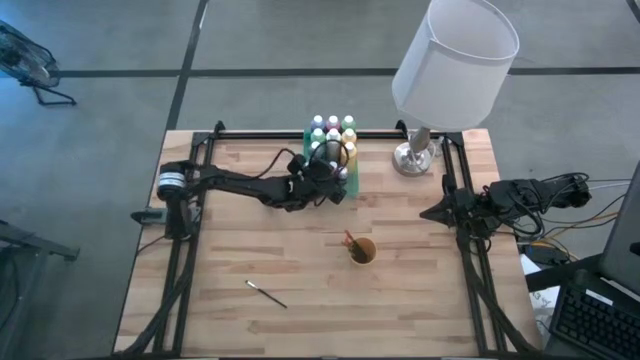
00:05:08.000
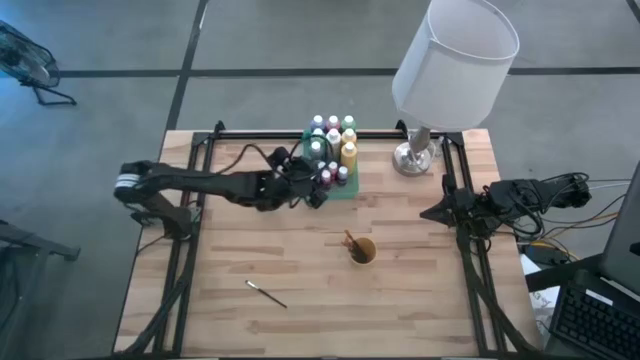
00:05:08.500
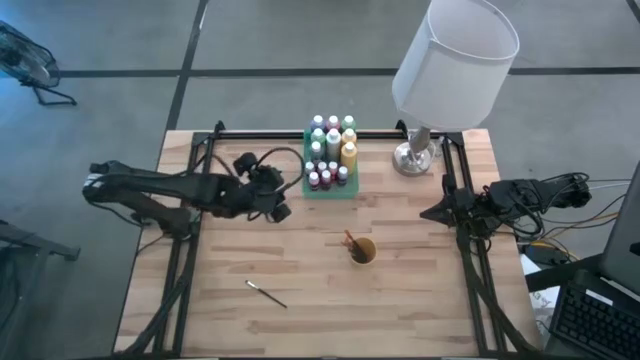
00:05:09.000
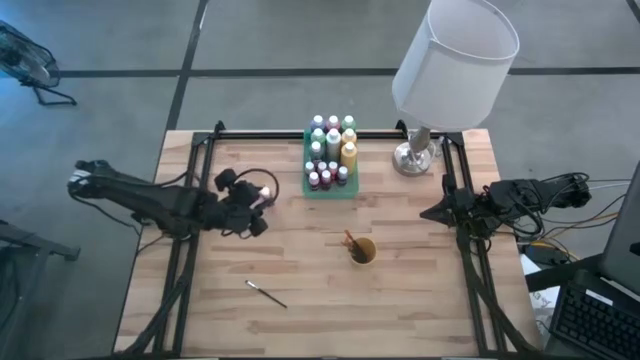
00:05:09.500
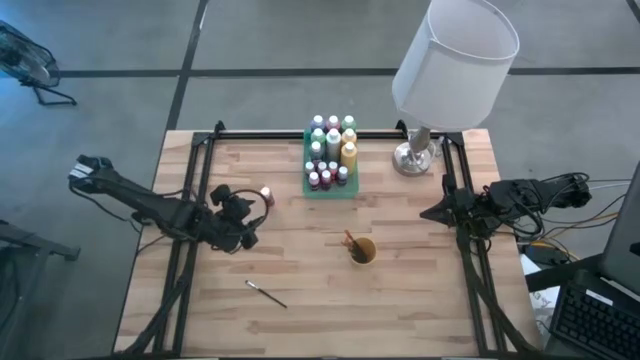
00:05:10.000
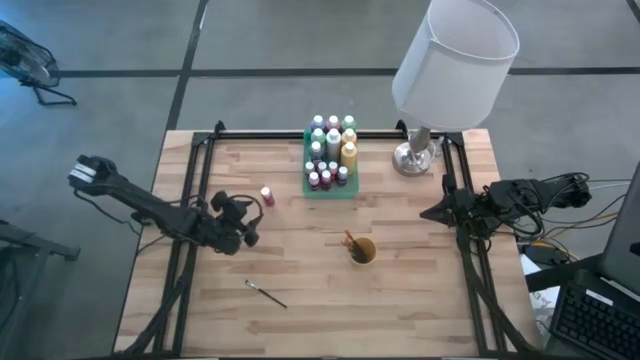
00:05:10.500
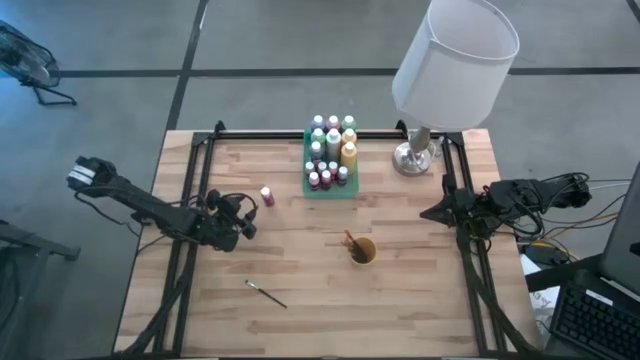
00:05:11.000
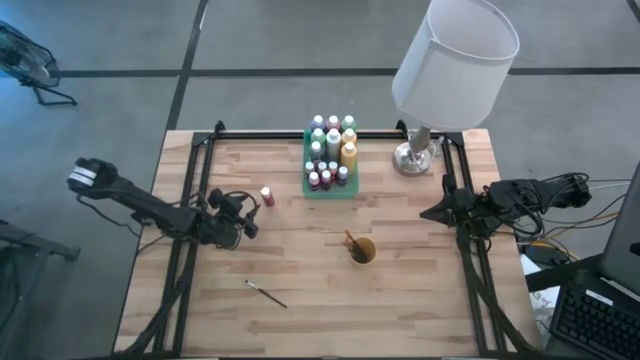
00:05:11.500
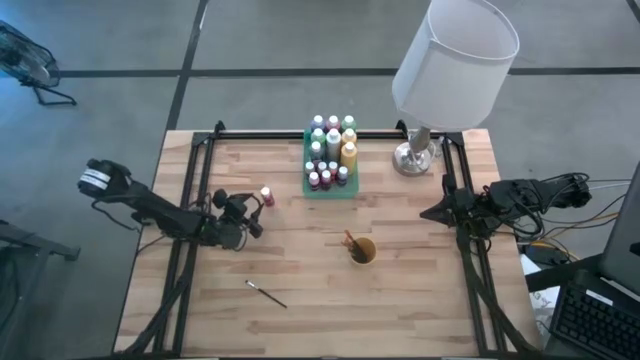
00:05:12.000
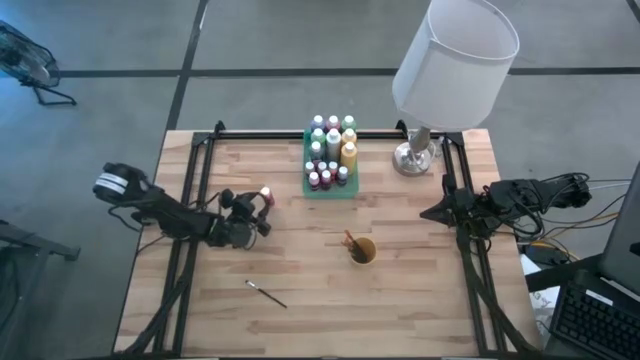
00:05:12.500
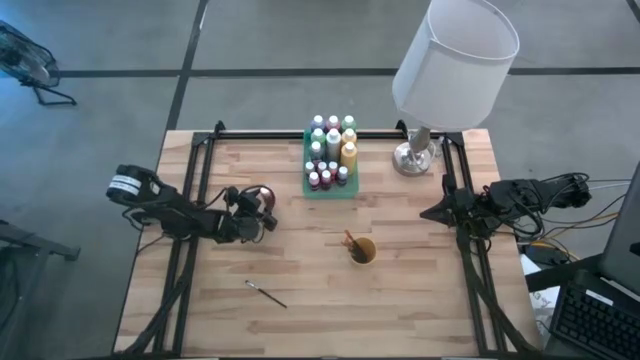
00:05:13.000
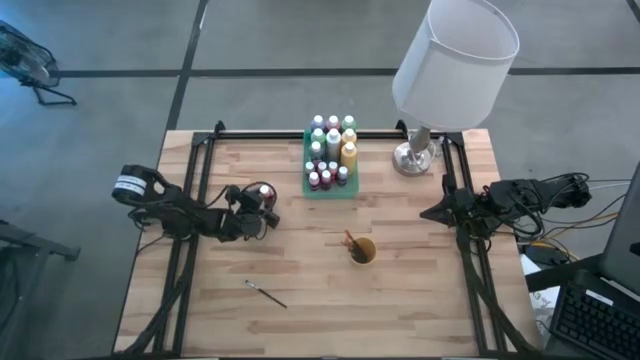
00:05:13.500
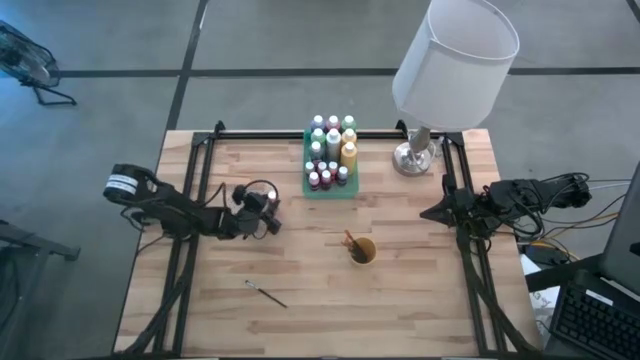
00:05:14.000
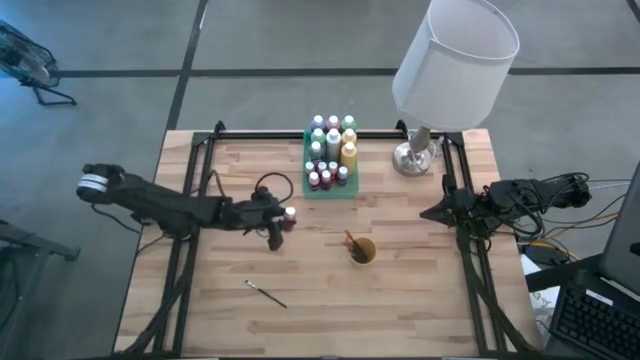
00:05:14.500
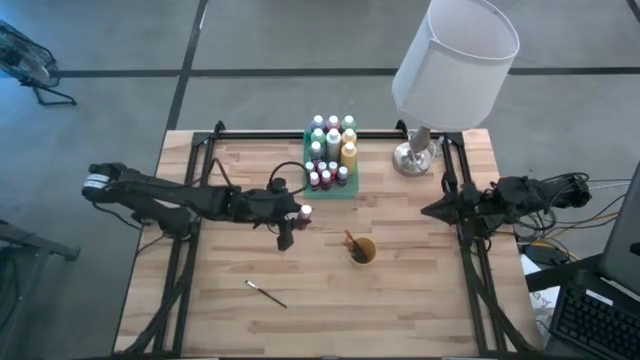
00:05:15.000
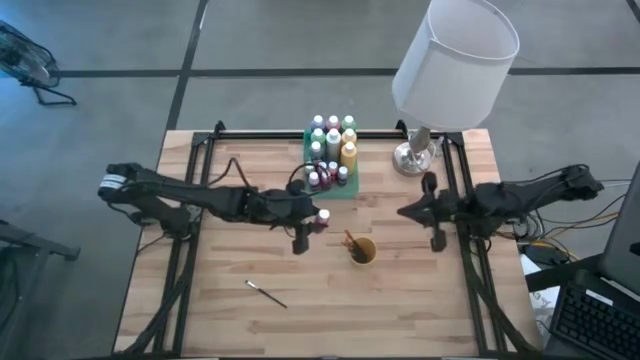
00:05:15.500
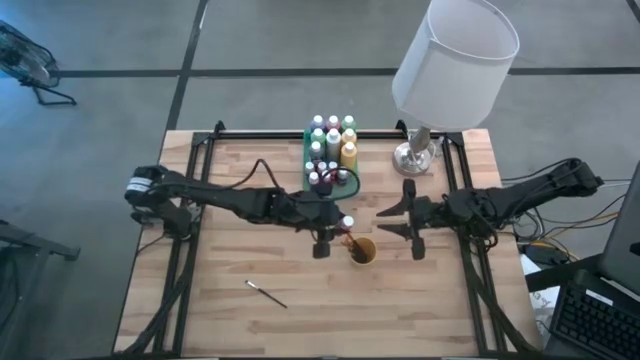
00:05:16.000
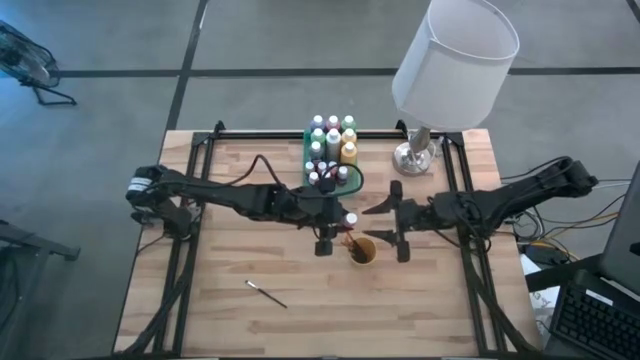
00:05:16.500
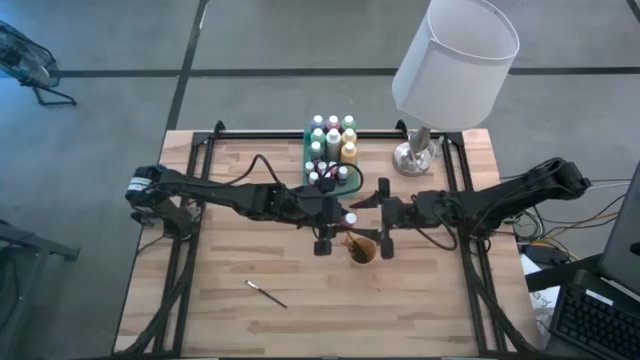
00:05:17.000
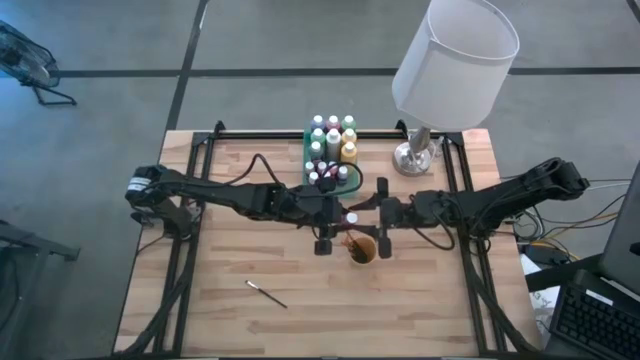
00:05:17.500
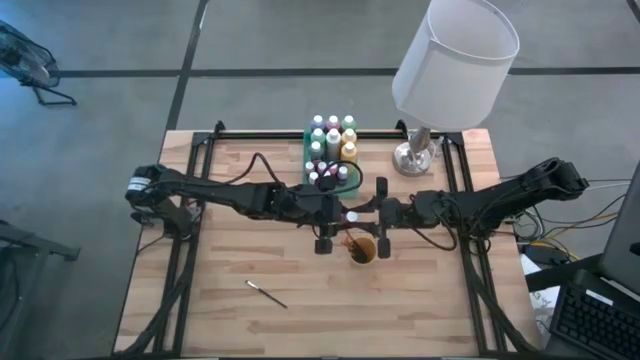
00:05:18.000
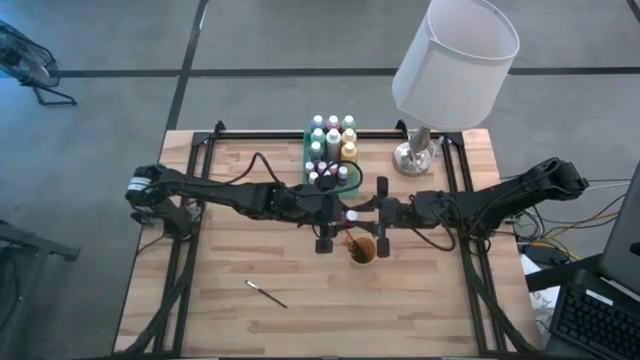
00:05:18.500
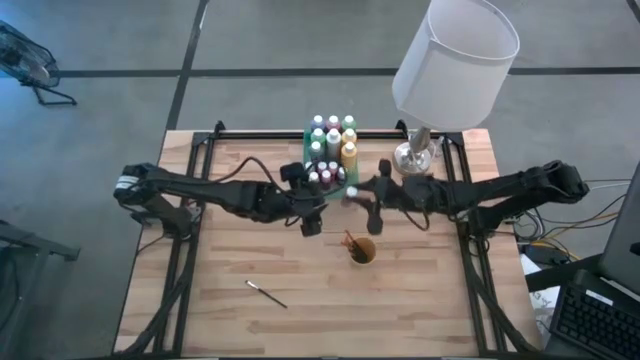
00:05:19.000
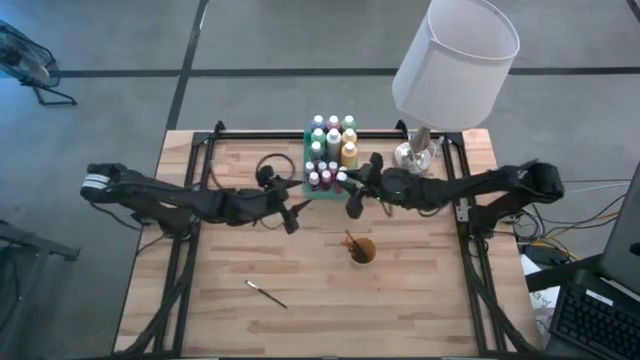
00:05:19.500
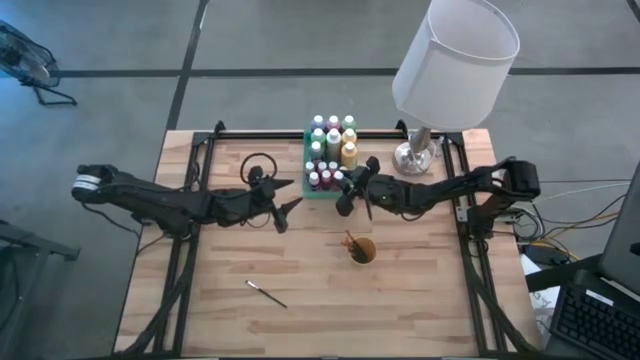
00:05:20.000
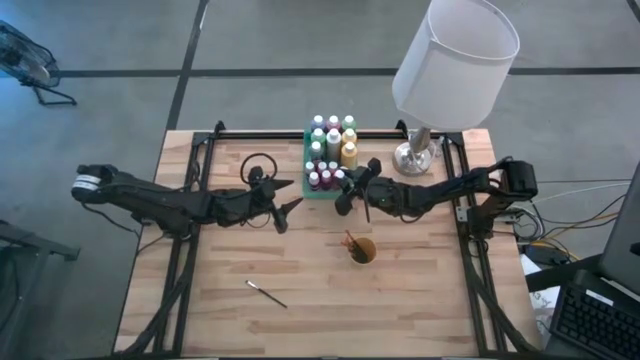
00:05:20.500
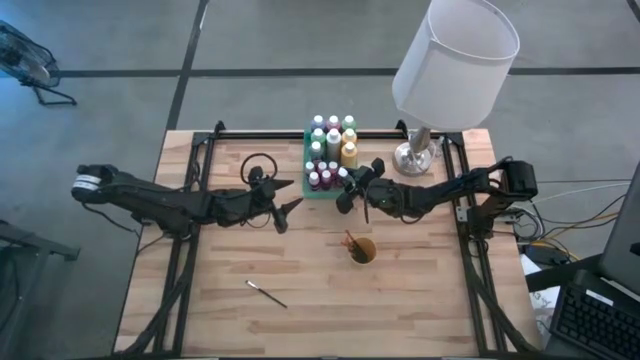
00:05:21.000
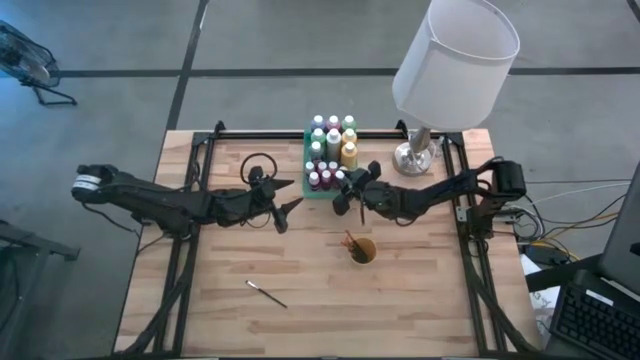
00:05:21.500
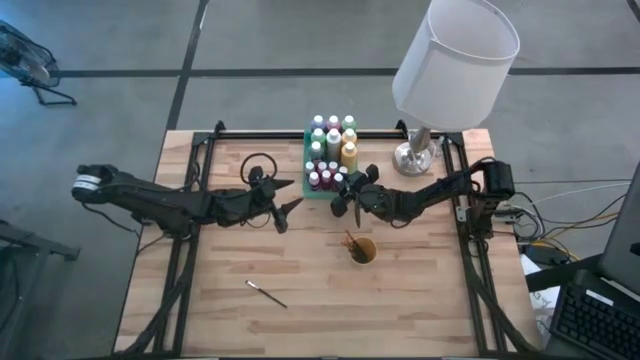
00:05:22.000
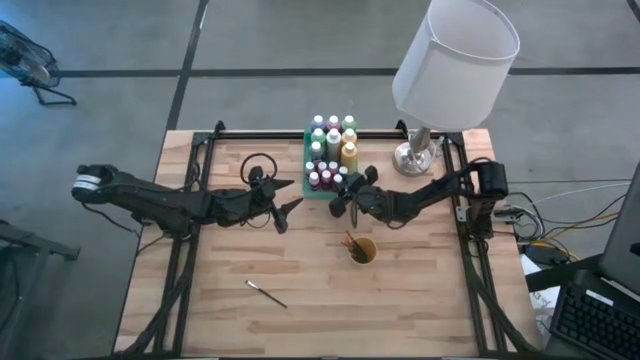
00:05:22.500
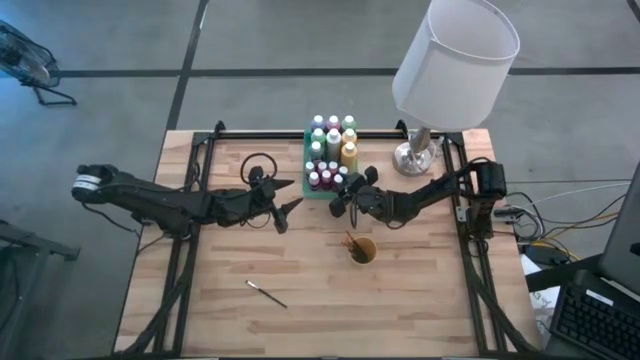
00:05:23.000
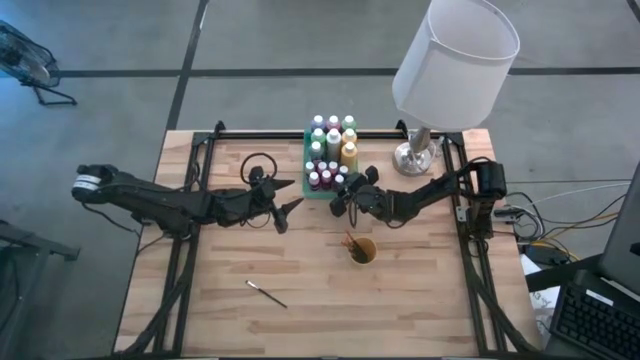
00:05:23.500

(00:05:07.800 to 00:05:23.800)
Task: Pick & Place Paint Supplies
Put the red paint bottle into the green bin

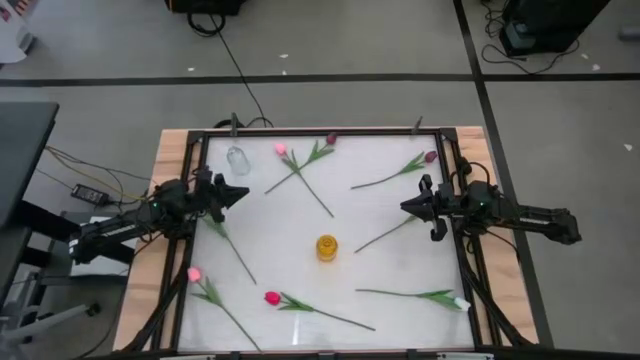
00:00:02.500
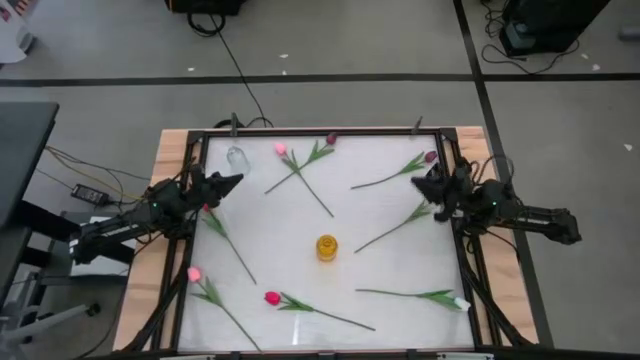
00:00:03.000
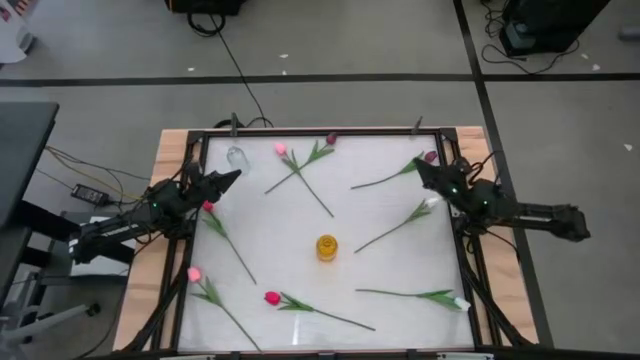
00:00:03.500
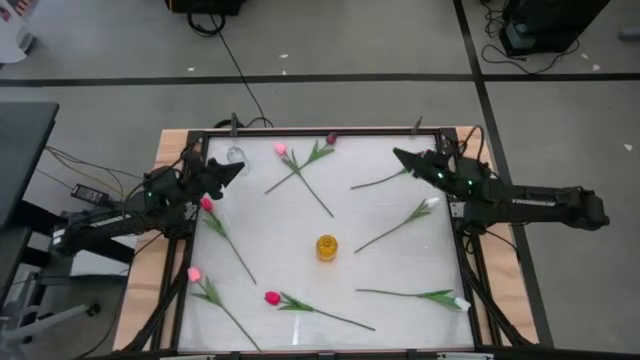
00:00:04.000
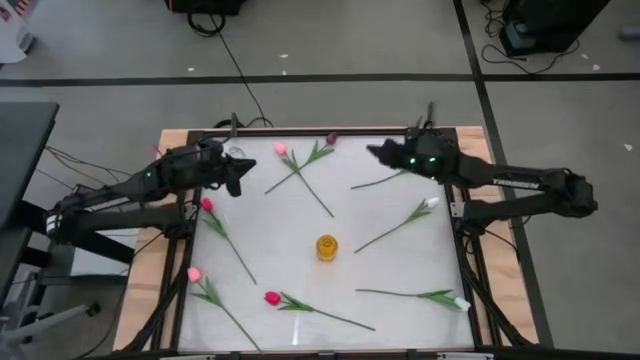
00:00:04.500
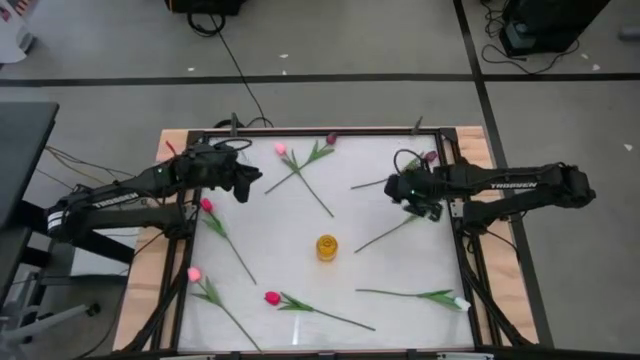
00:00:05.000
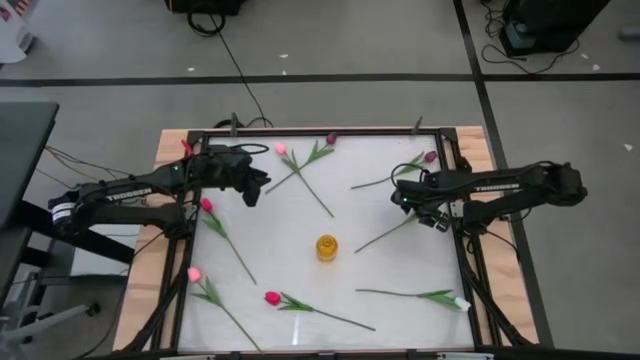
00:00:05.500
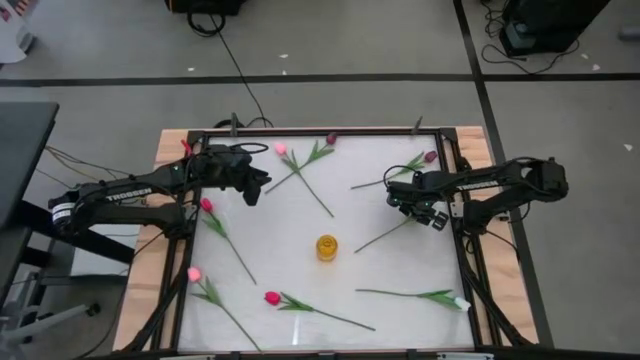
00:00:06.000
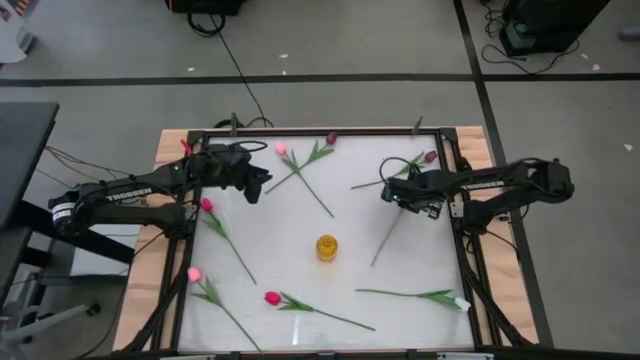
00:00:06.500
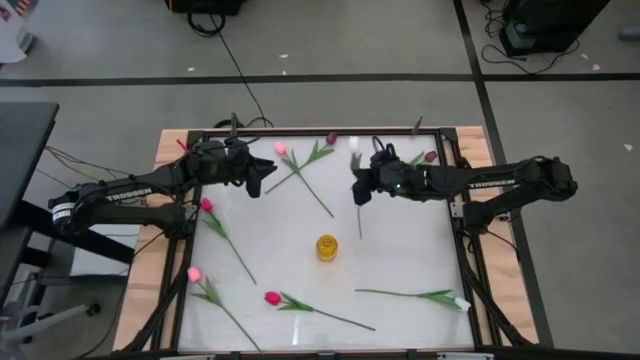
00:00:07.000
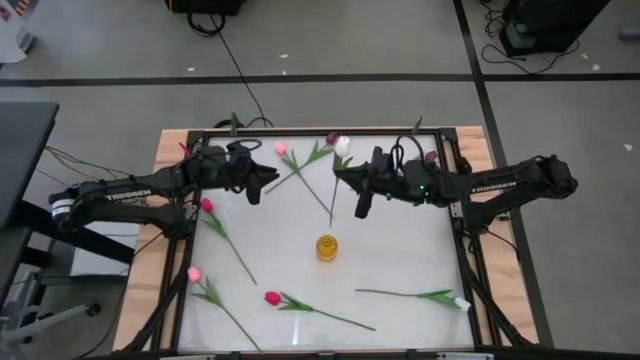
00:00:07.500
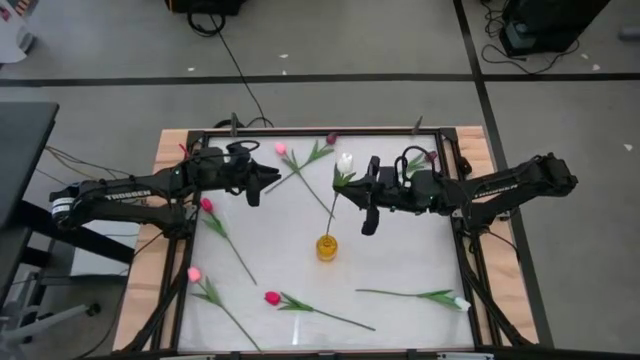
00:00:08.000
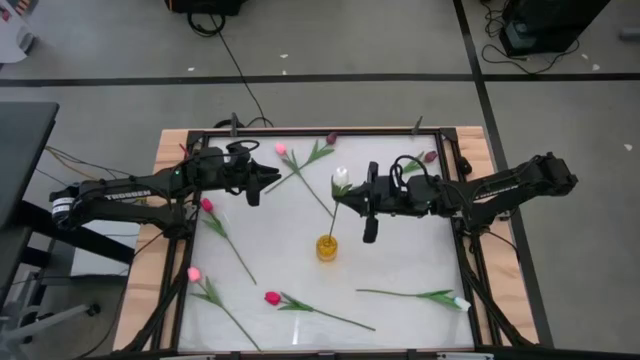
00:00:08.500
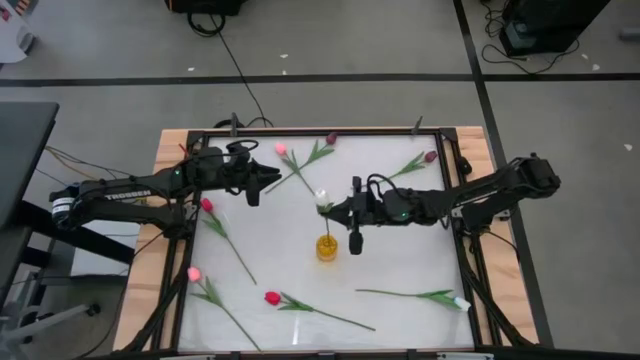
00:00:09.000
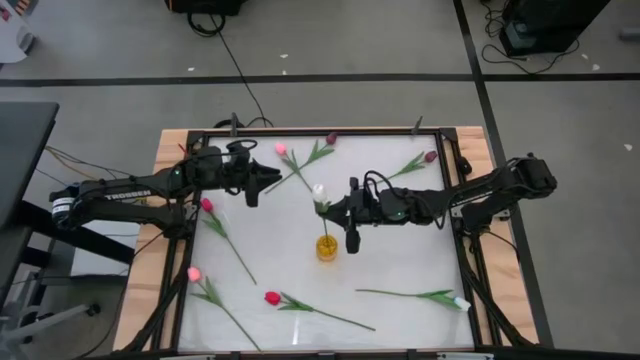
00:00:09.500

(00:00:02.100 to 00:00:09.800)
Task: Sort flowers into vase by color
Put the top white tulip into the yellow flower vase
